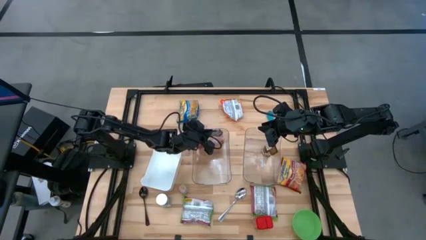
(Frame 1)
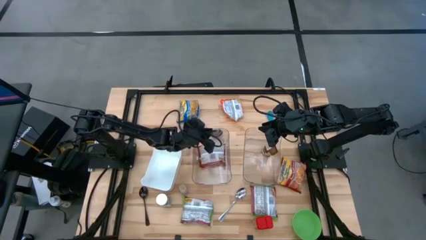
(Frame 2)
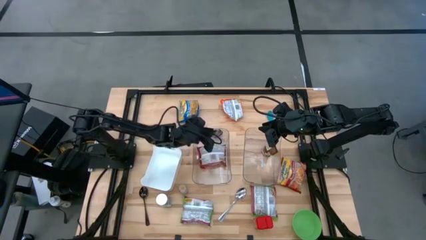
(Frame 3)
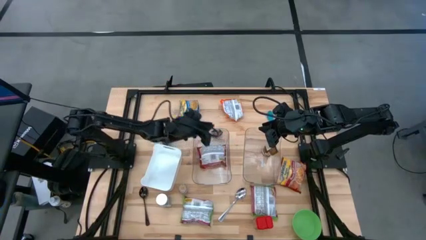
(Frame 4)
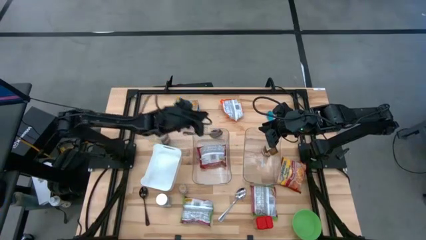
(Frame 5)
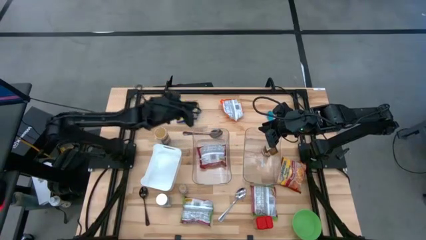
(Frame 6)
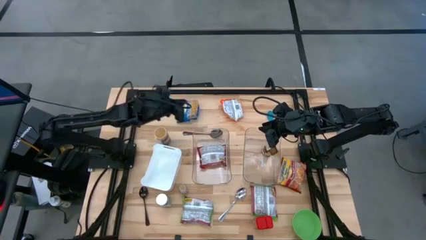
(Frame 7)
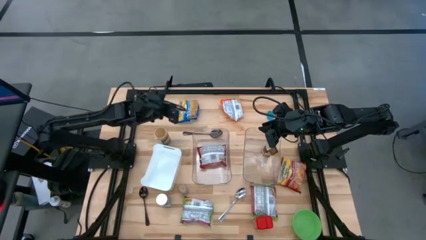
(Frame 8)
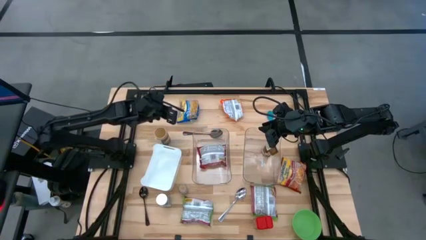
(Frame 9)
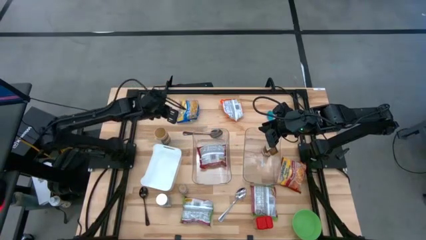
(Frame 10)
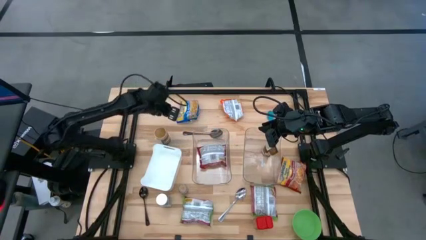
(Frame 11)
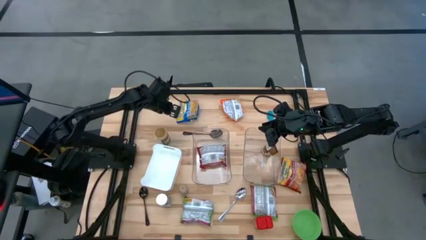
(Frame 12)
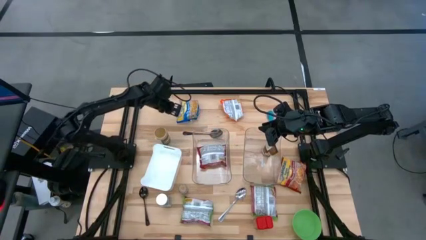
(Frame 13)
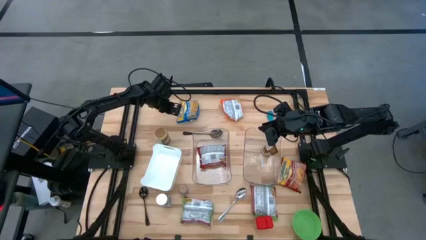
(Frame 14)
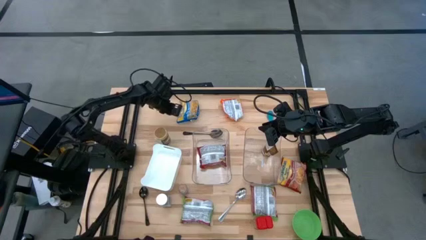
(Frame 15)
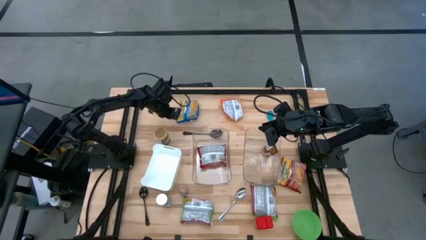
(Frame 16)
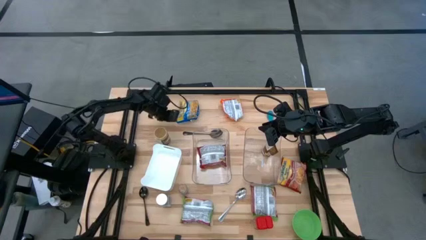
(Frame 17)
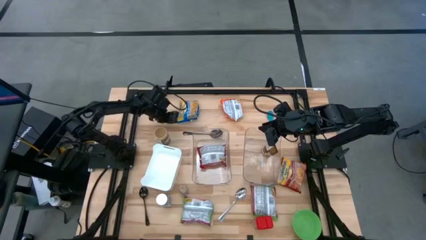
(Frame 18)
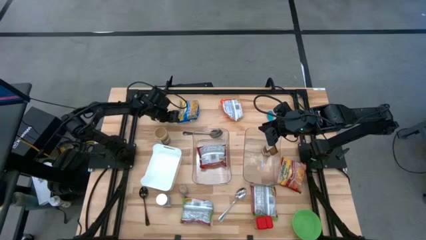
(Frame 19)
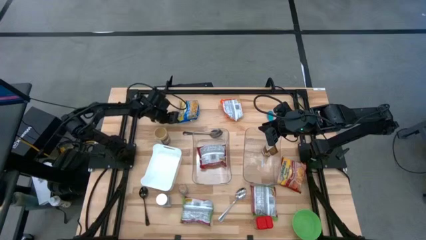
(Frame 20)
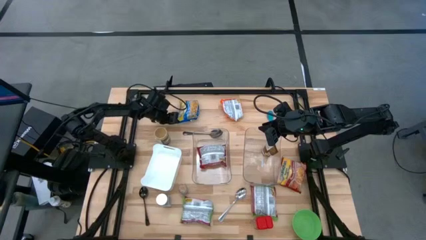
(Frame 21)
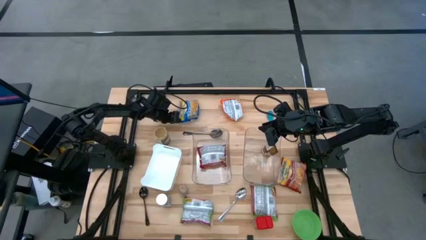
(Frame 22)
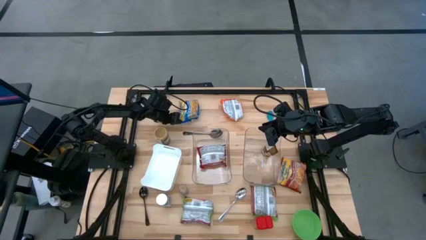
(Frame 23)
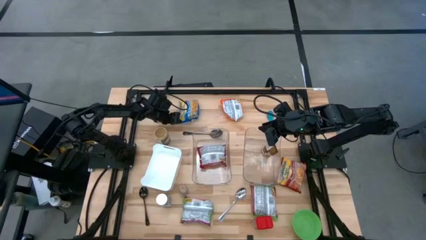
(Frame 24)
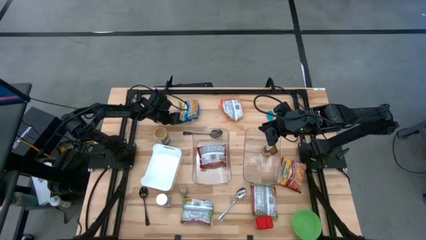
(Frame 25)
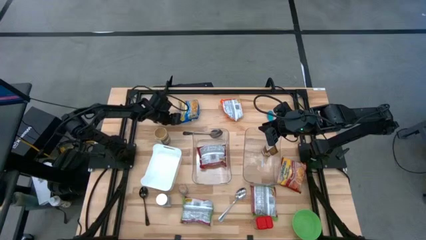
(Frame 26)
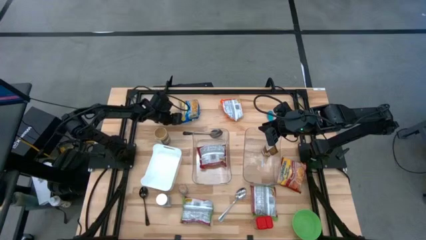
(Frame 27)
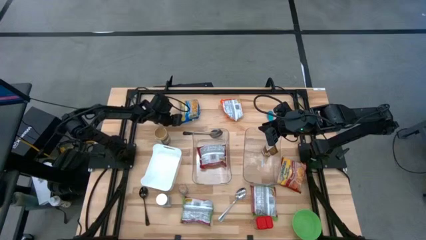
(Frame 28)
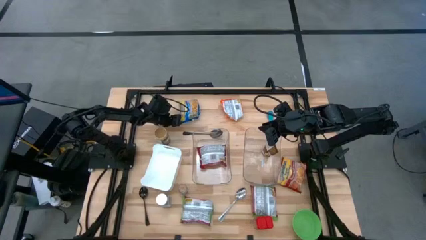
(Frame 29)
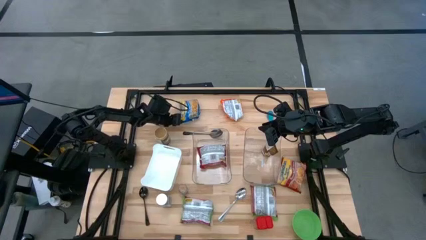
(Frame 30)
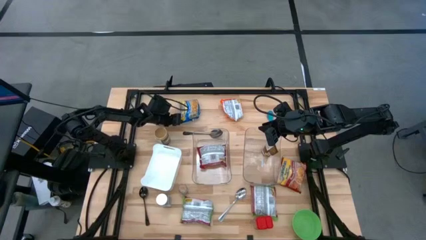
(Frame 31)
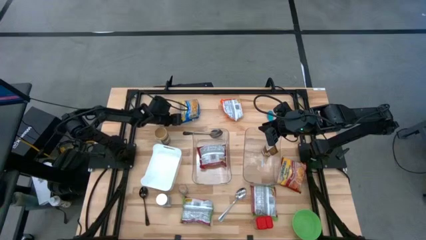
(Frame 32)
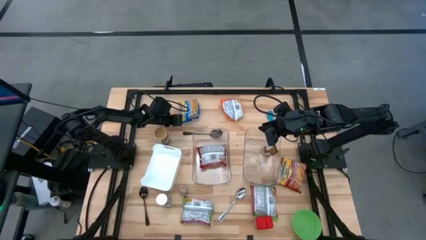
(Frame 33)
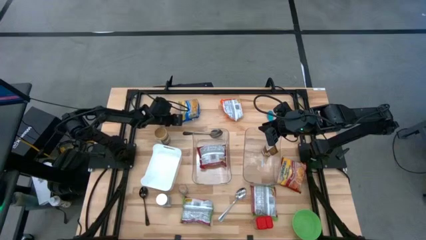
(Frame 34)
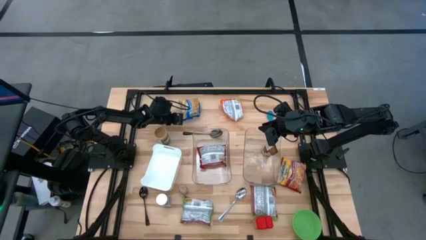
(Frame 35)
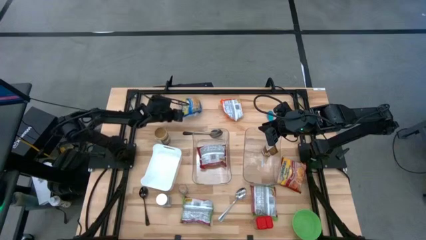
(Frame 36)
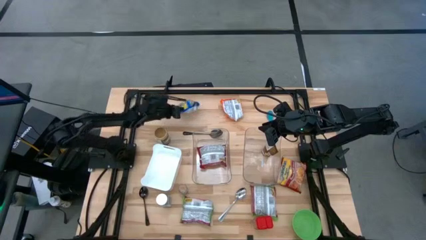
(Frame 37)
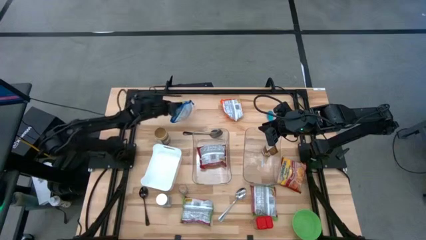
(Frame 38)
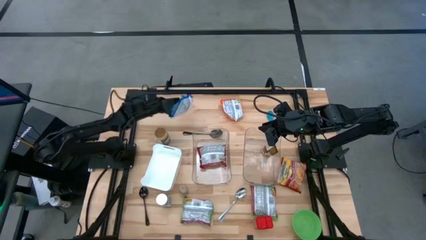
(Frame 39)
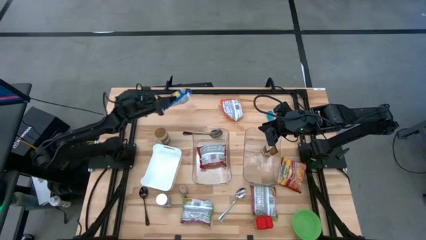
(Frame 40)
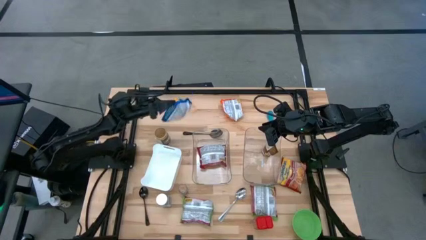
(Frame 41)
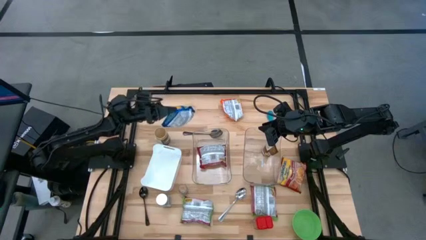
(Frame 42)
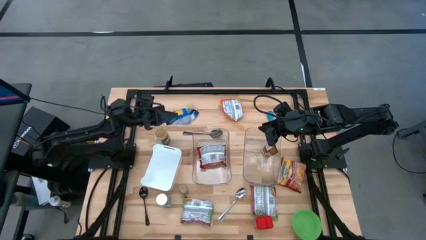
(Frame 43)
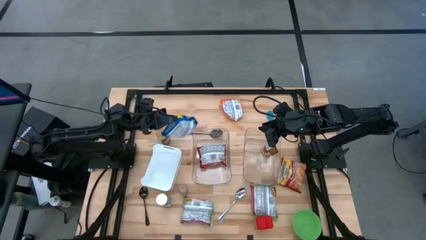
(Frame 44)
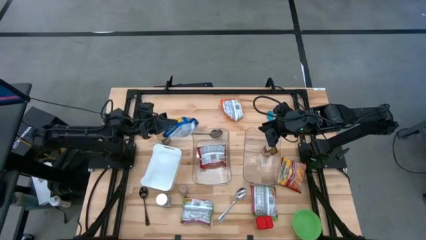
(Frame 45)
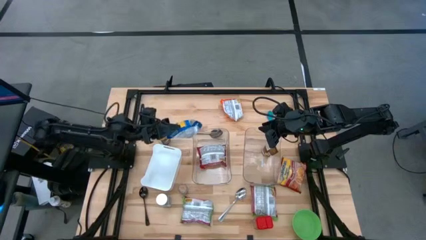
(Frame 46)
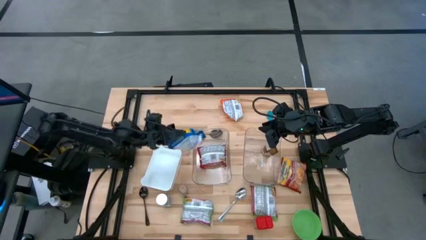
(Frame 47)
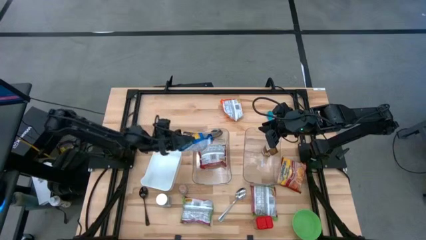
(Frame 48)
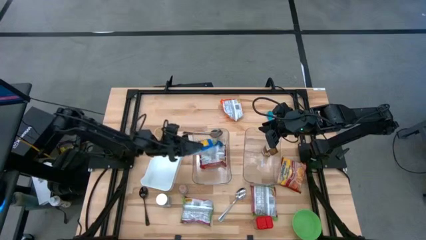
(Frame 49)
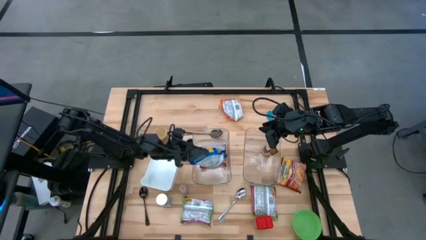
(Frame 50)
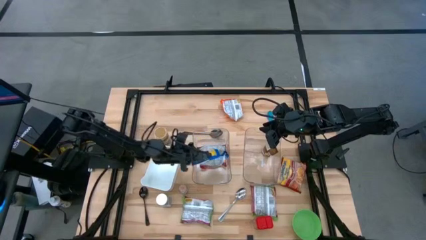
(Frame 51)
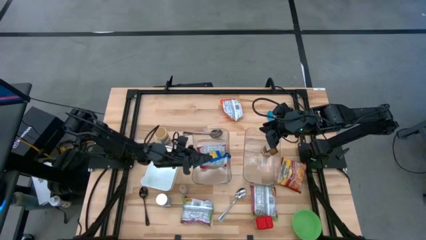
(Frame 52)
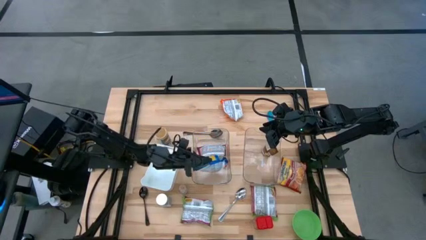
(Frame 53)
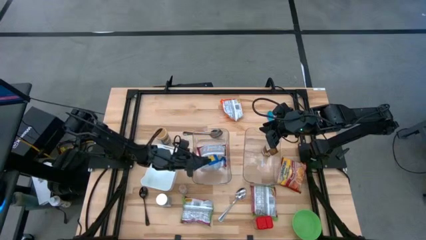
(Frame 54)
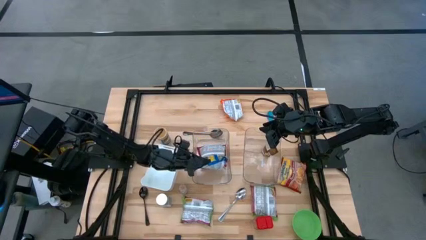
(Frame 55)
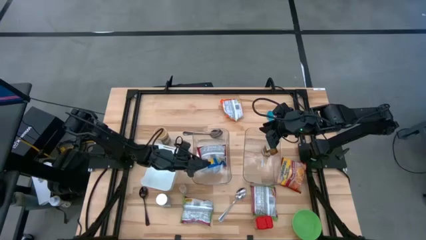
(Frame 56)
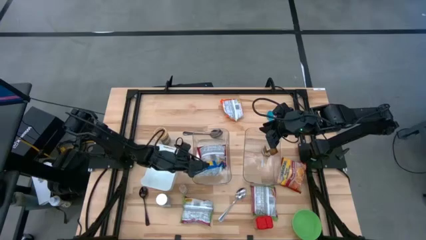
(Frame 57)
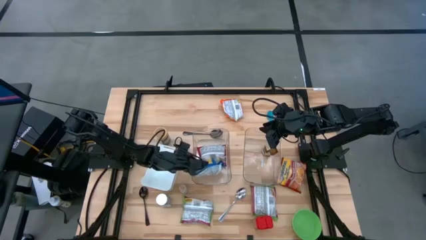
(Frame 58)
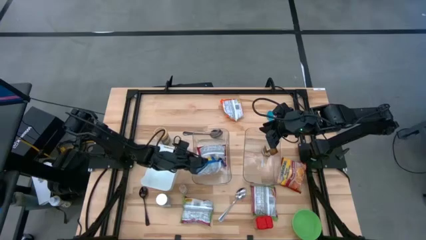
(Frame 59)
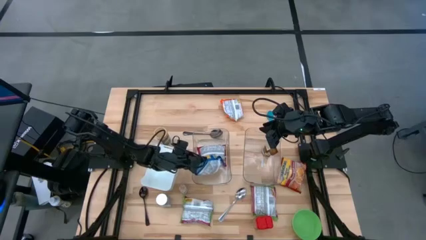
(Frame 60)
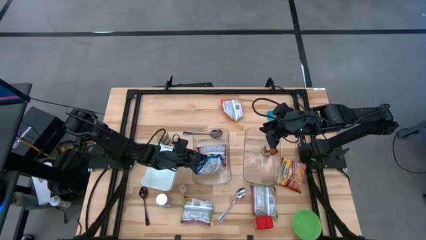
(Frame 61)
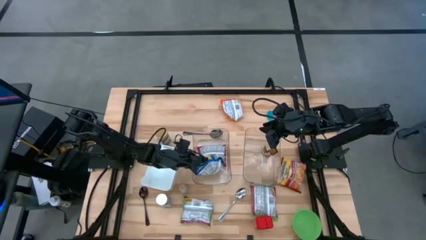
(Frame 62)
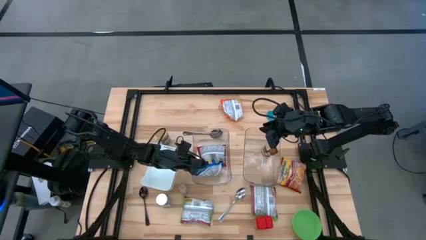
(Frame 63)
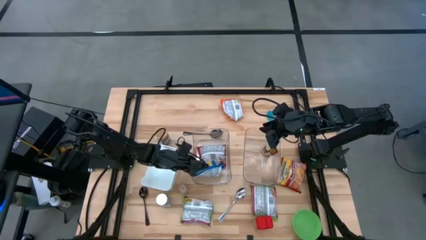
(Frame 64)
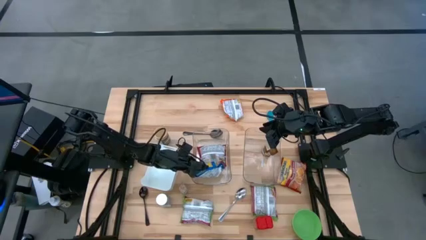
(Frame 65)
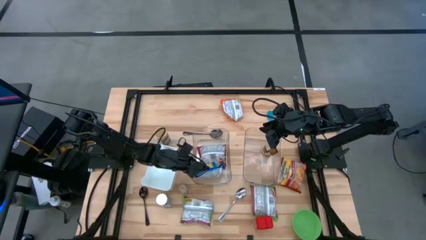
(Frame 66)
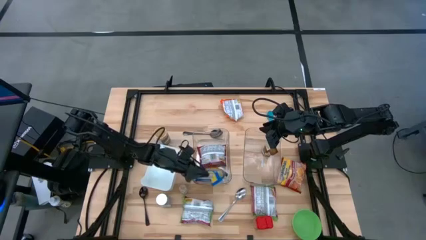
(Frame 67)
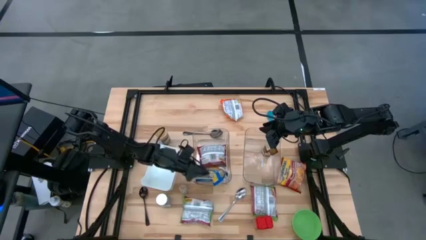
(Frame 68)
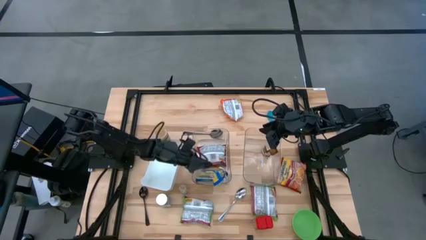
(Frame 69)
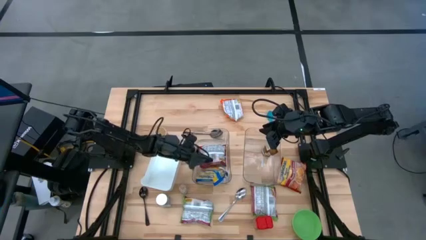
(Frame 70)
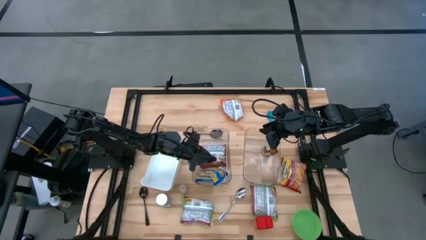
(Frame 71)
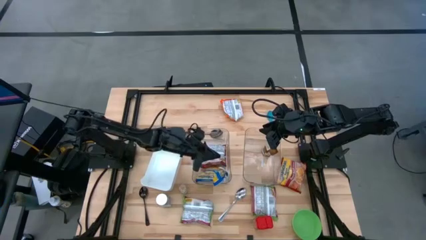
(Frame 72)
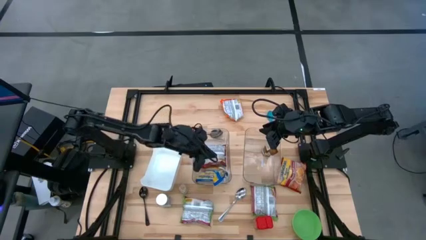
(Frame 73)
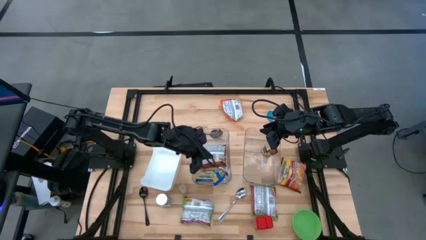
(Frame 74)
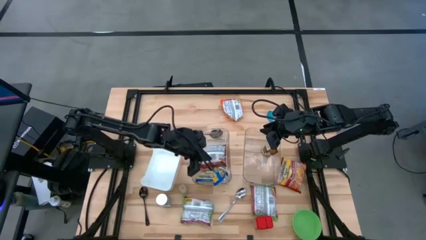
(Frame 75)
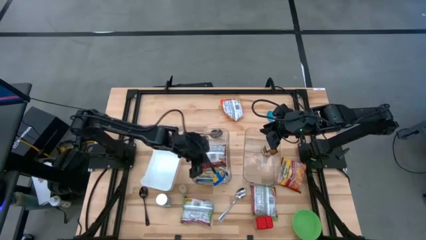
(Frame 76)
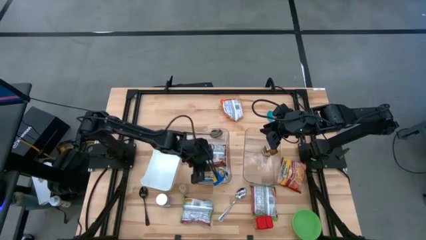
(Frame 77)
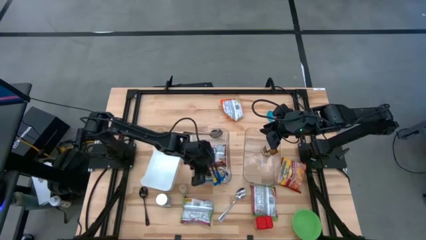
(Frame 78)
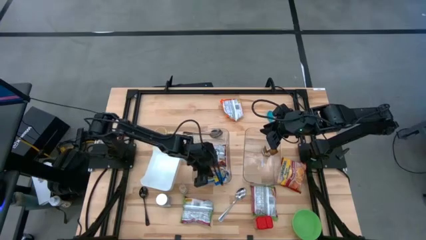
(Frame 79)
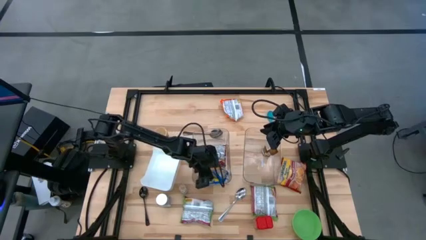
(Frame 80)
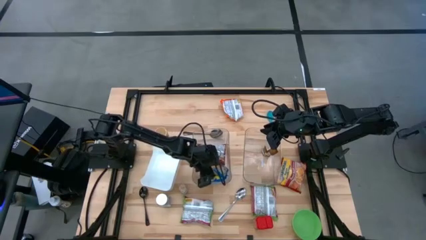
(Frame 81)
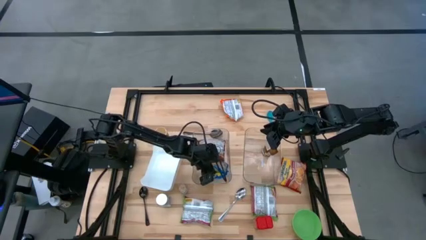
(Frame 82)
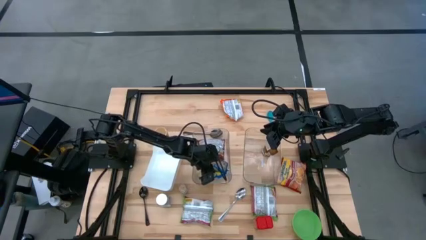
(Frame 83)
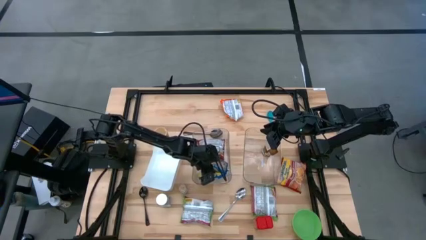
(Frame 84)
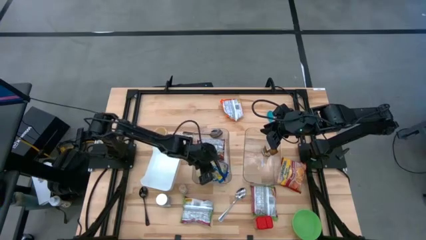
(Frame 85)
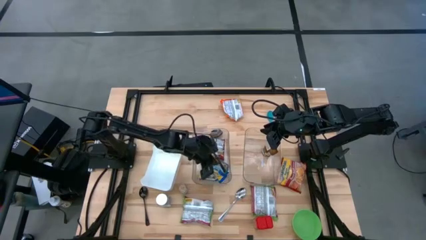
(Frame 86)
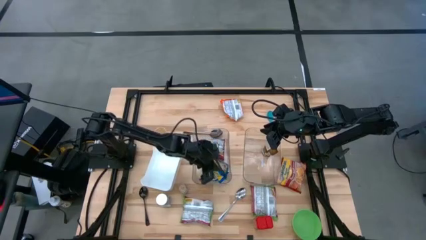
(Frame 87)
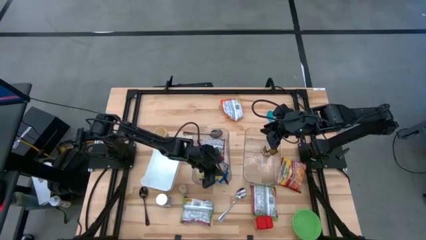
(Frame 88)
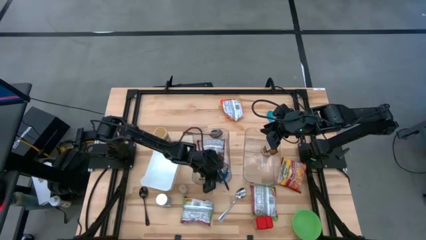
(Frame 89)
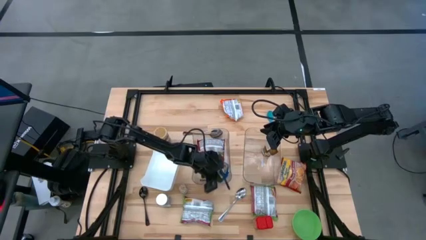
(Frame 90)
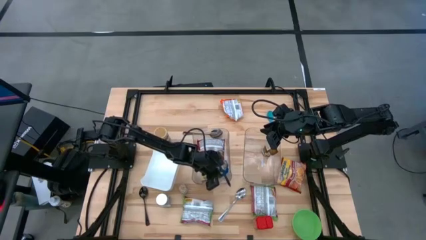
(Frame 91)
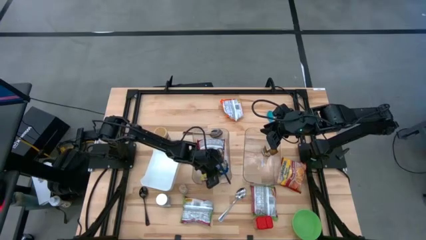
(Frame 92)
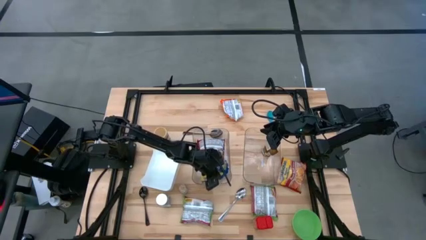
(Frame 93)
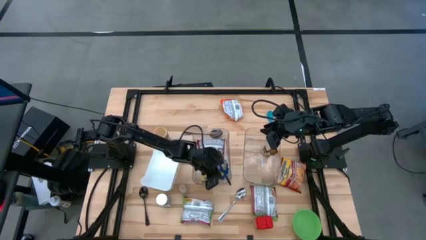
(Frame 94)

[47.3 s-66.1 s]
Task: Pick & Place Food Item
Put the blue noodle pack into the left transparent bin
